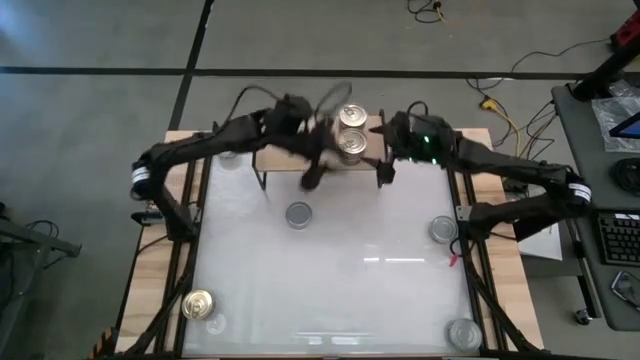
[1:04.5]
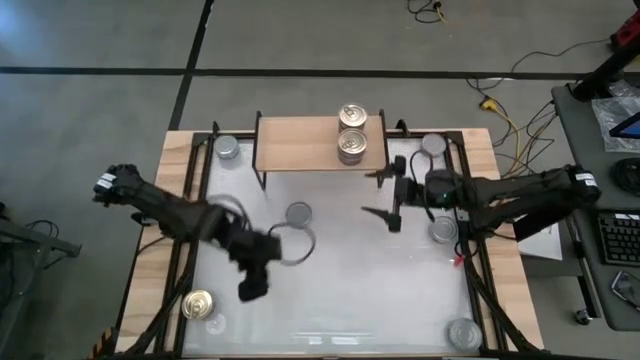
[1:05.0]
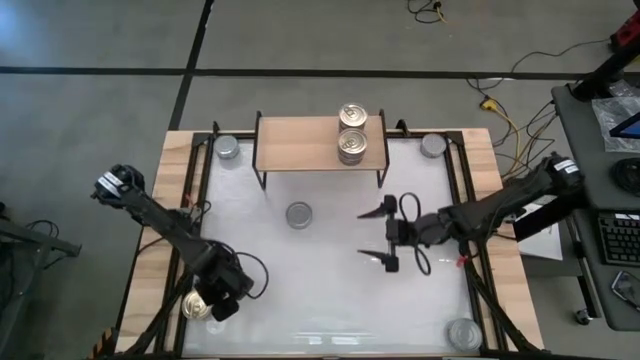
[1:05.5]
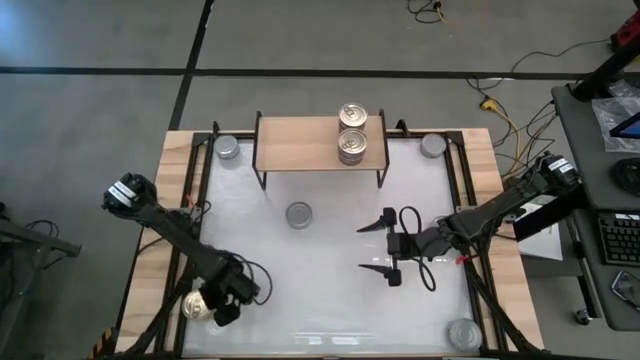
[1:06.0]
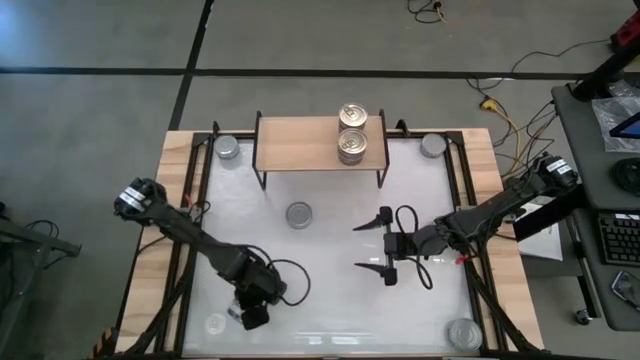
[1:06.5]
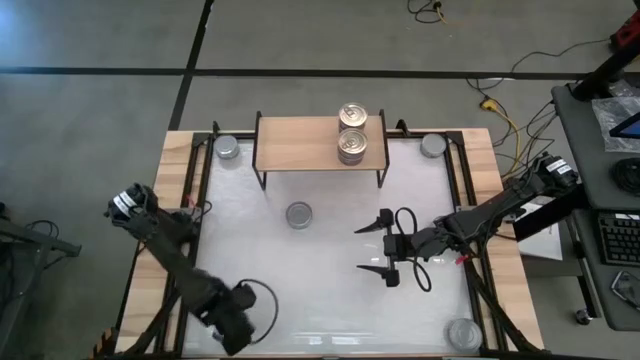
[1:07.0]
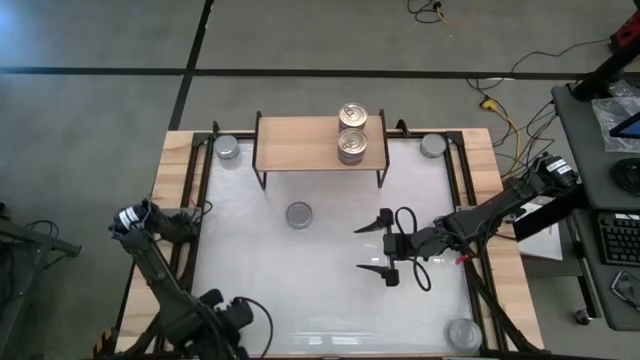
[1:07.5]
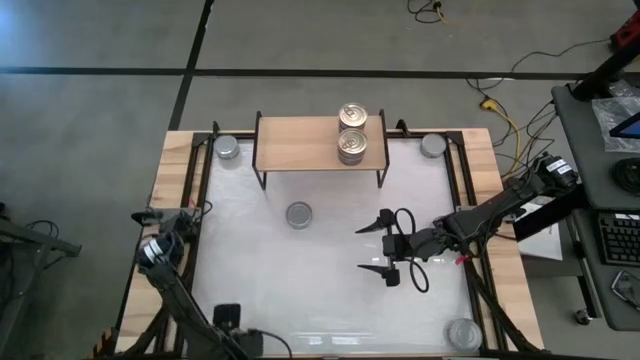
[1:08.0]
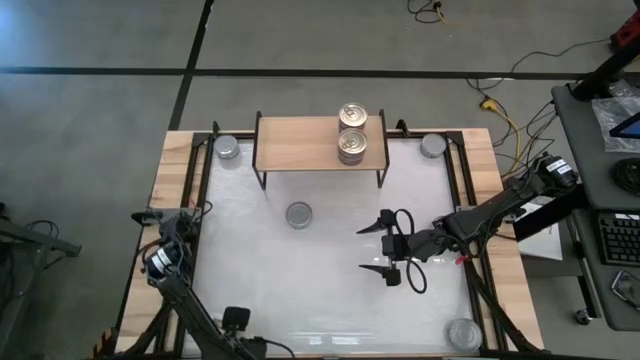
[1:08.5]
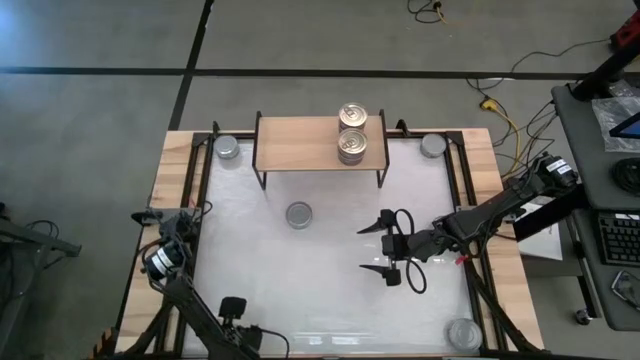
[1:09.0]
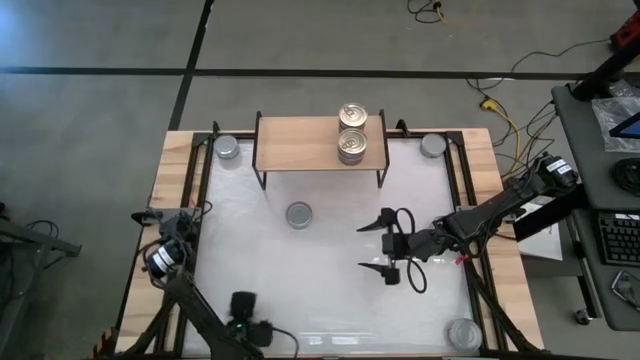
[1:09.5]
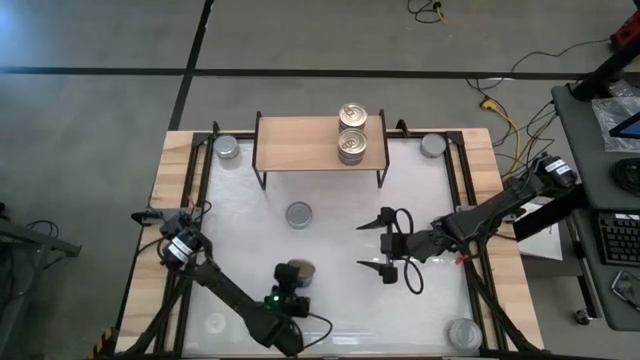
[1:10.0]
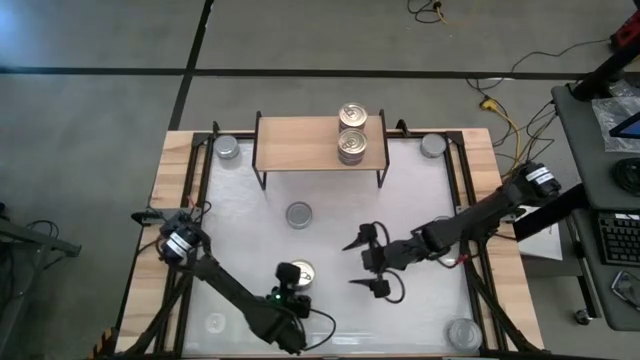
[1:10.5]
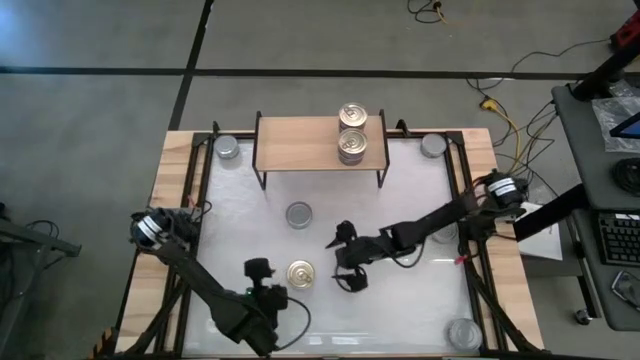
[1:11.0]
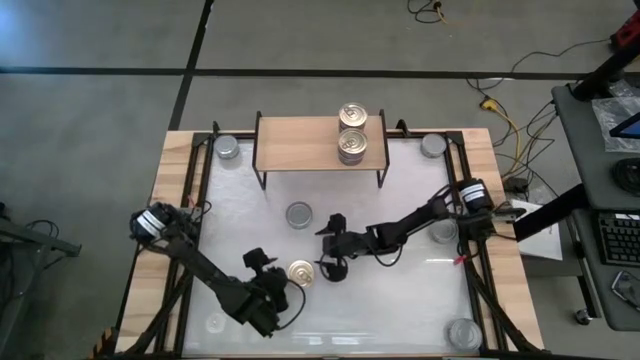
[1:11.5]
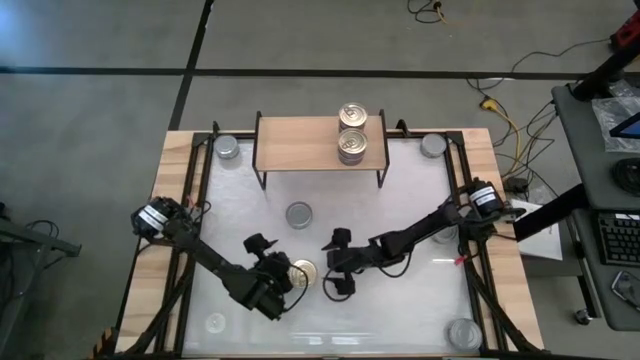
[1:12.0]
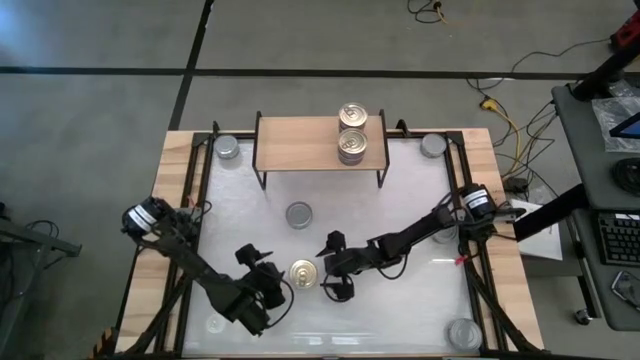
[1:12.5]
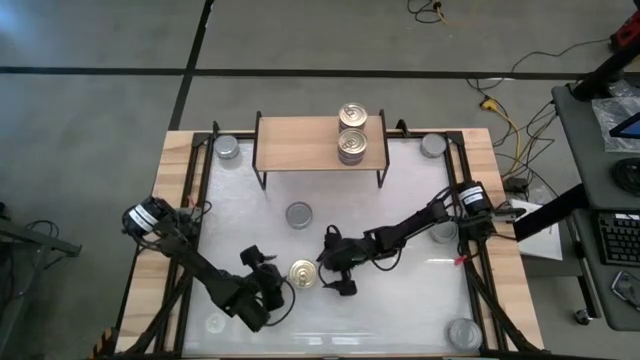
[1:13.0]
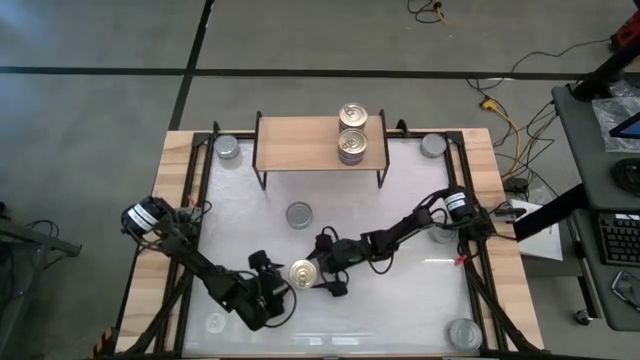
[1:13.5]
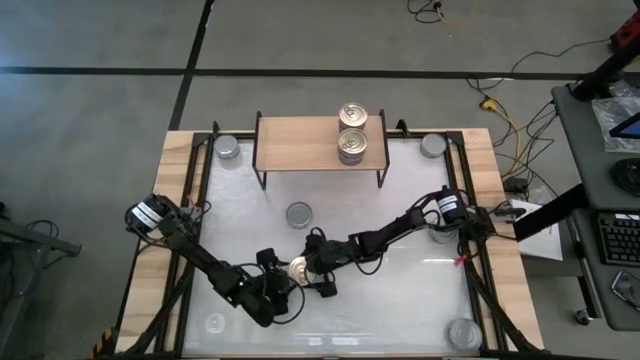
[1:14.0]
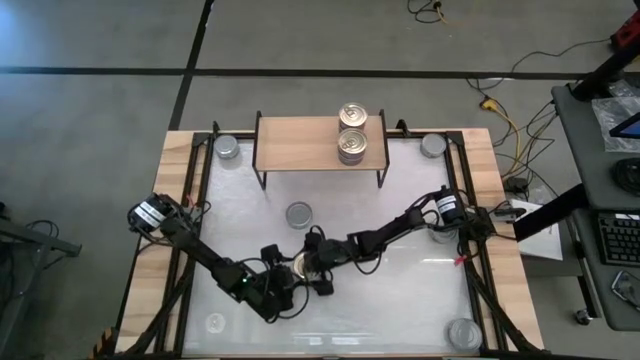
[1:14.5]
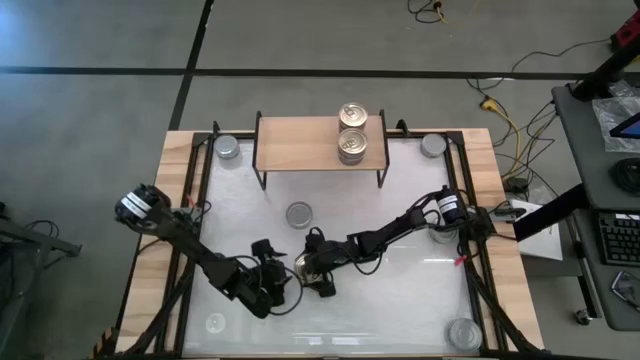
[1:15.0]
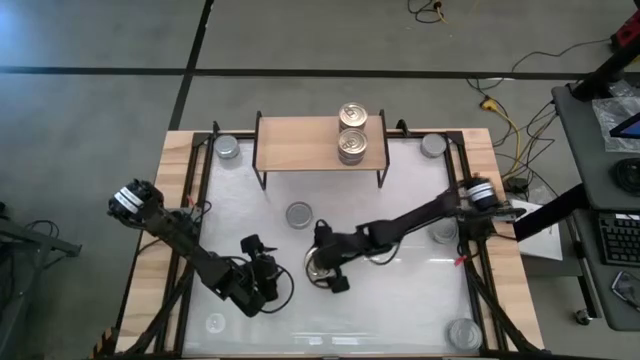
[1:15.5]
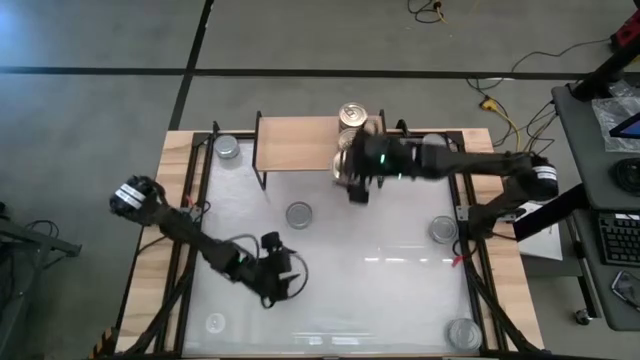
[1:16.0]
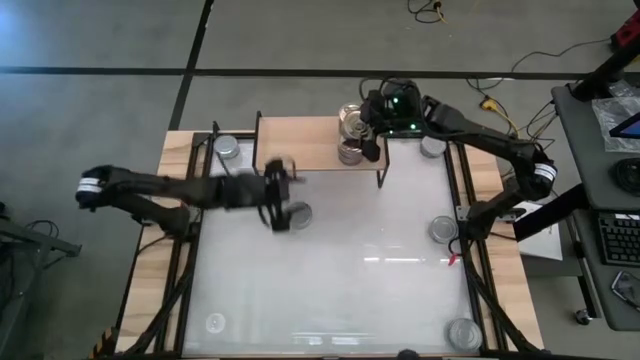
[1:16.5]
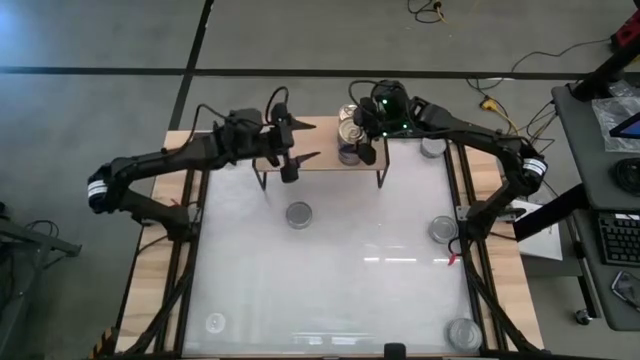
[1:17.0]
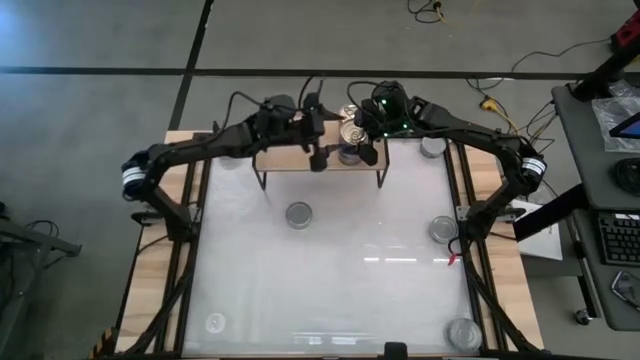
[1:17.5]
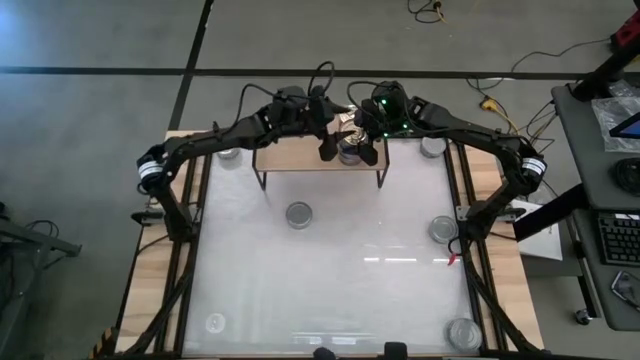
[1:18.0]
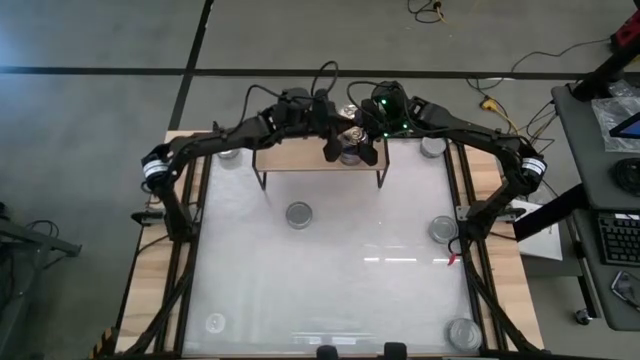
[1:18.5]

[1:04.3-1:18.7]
Task: Stack canned seafood by type on shelf
Stack the blue-pink tuna can on top of the other blue-pink tuna can on the shelf

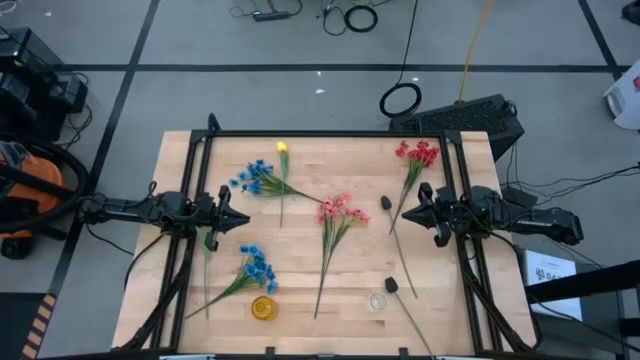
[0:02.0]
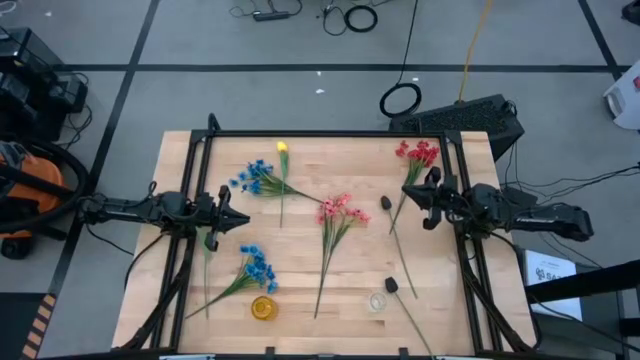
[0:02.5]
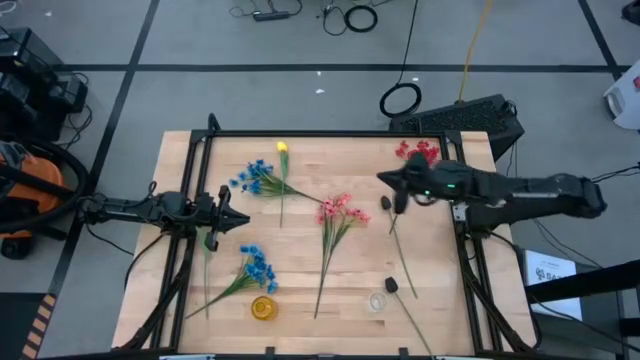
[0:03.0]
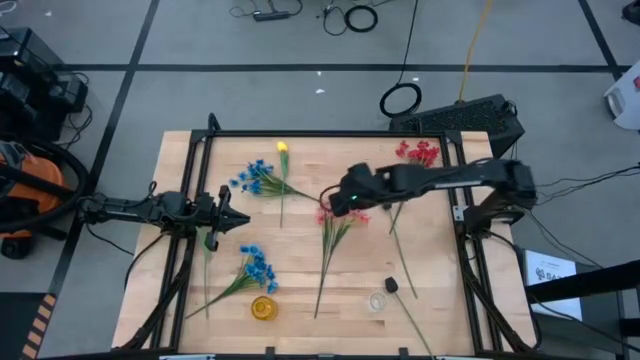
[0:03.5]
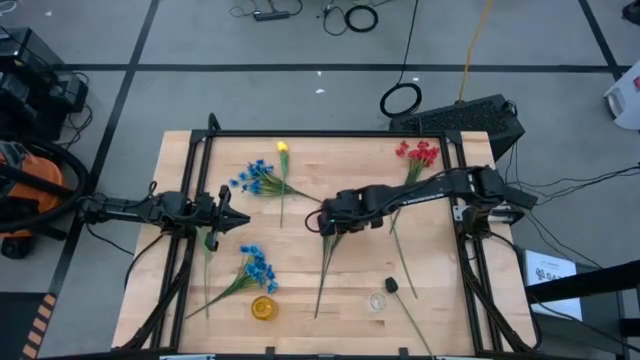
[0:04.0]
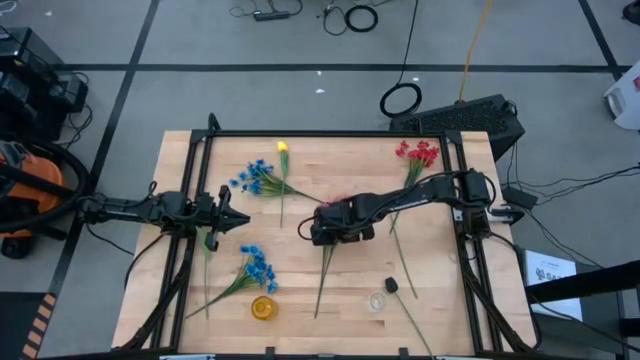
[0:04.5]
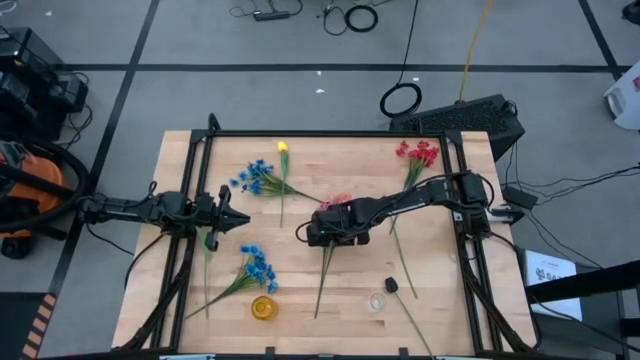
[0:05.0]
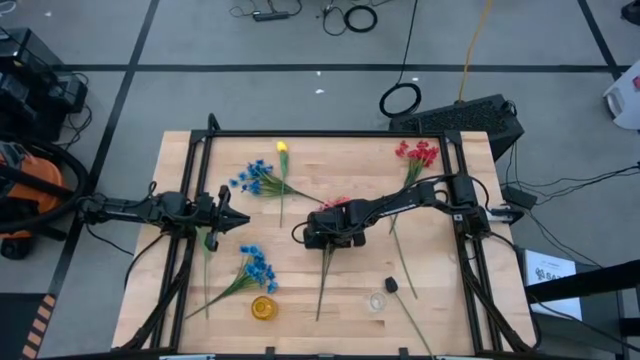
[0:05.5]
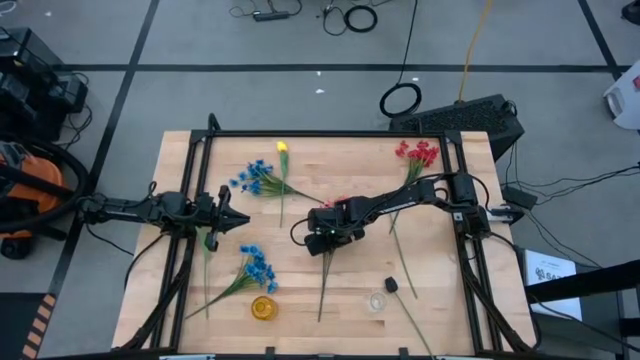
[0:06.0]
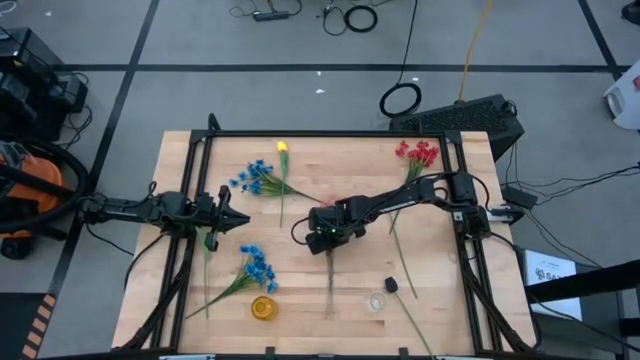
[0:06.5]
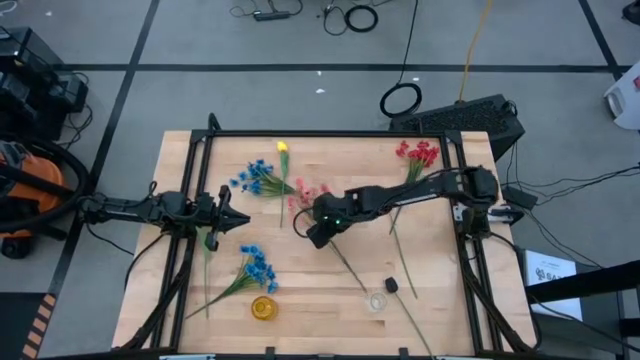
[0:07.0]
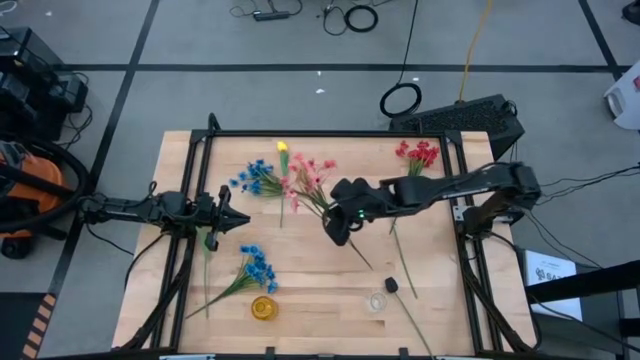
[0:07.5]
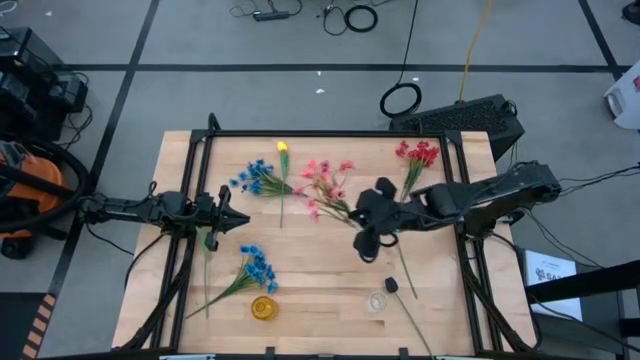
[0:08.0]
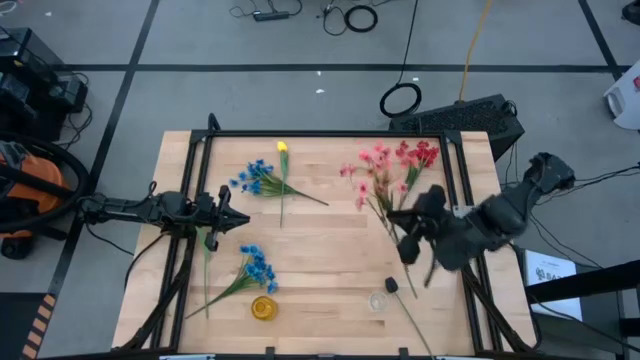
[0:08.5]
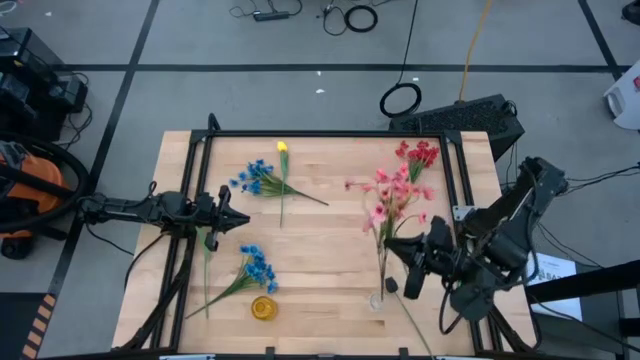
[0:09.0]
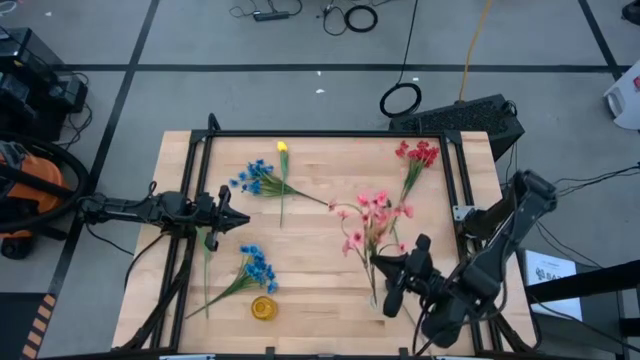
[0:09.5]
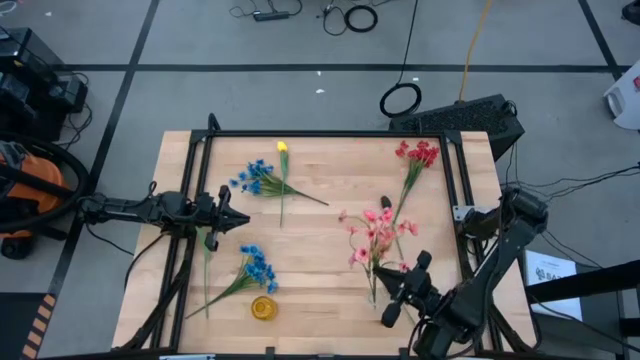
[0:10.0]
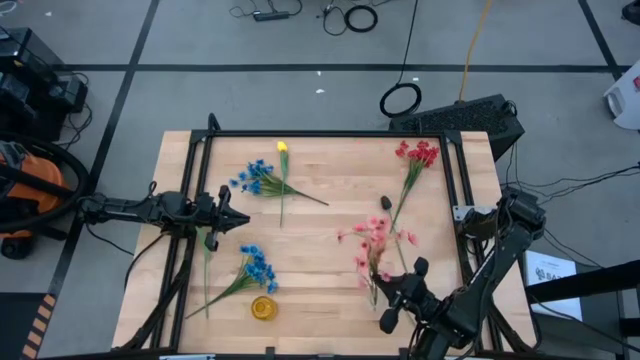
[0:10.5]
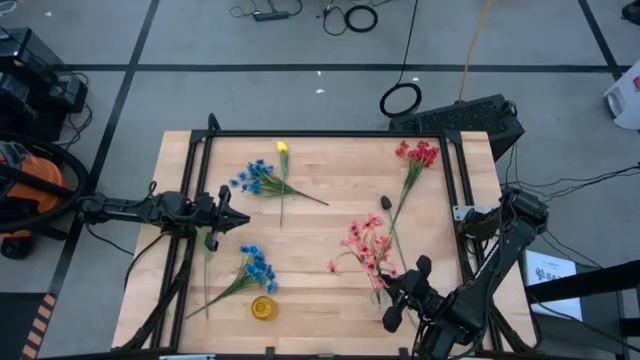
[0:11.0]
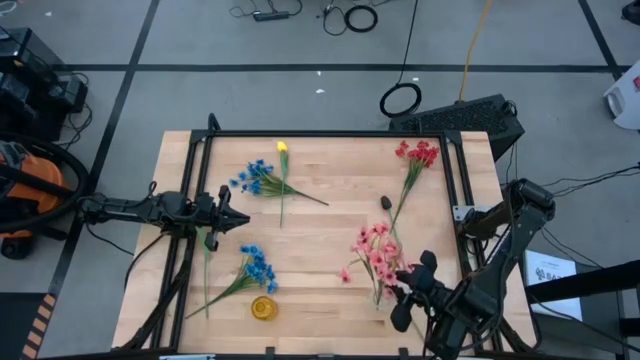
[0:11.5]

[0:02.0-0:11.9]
Task: Sort flowers into vase by color
Put the pink flowers into the transparent vase
